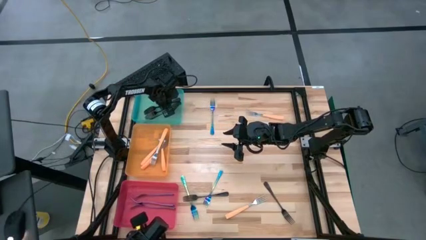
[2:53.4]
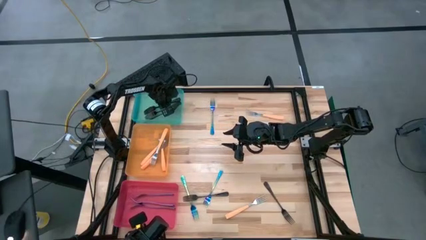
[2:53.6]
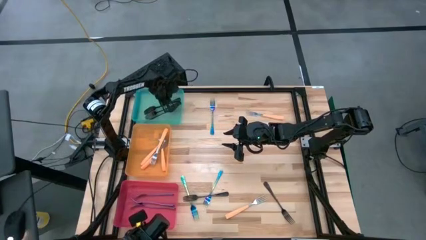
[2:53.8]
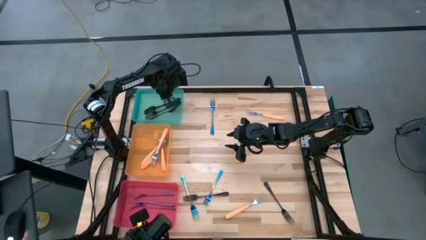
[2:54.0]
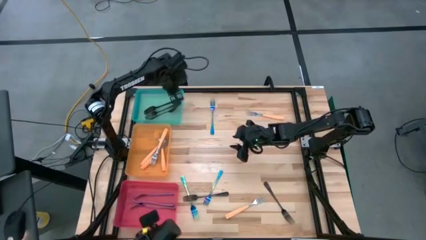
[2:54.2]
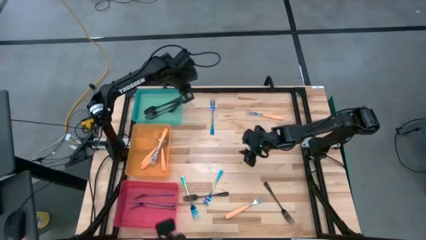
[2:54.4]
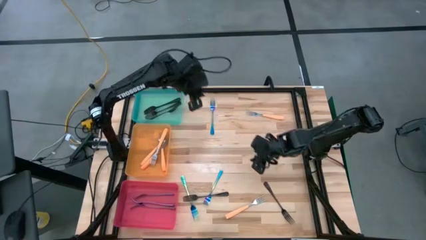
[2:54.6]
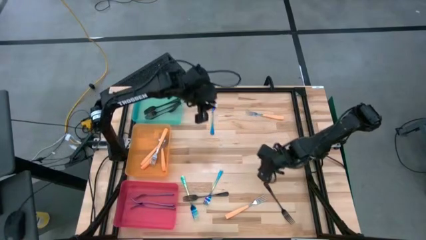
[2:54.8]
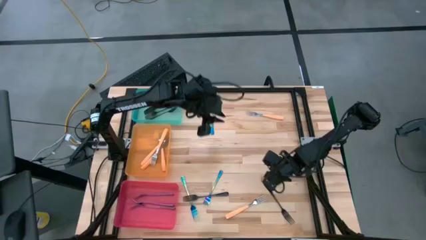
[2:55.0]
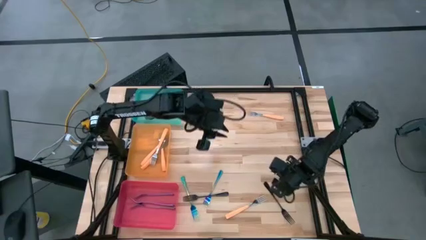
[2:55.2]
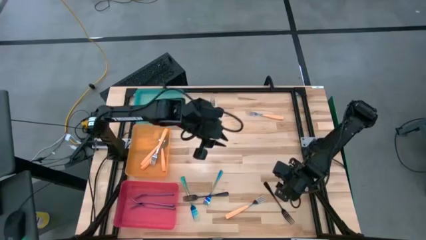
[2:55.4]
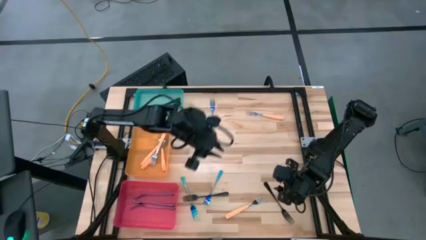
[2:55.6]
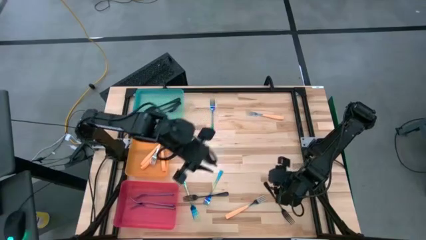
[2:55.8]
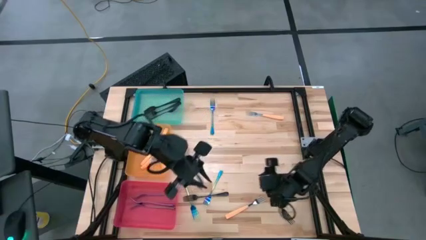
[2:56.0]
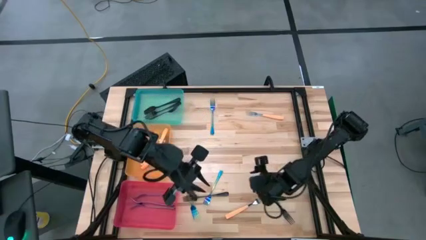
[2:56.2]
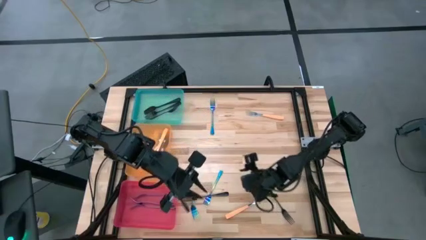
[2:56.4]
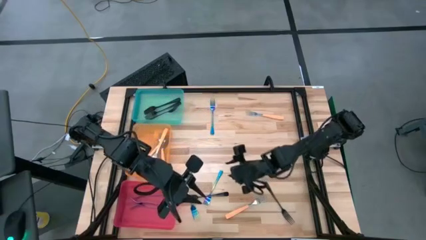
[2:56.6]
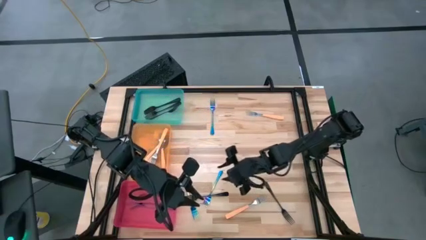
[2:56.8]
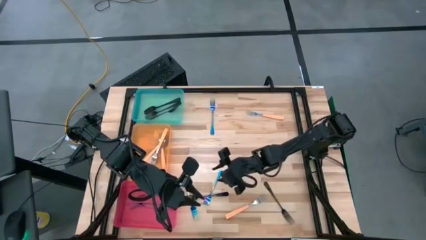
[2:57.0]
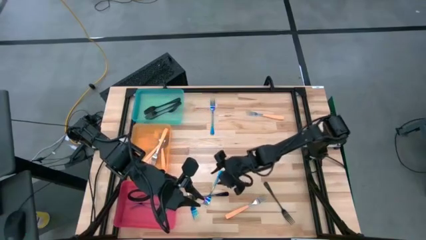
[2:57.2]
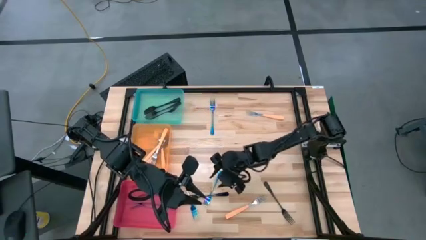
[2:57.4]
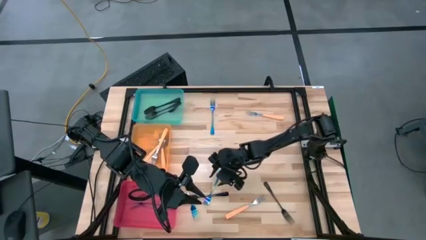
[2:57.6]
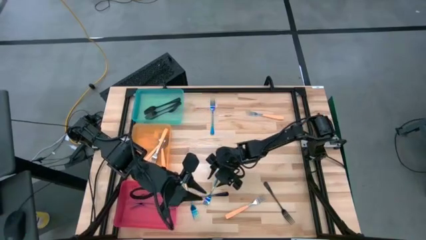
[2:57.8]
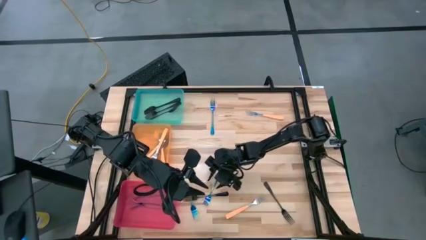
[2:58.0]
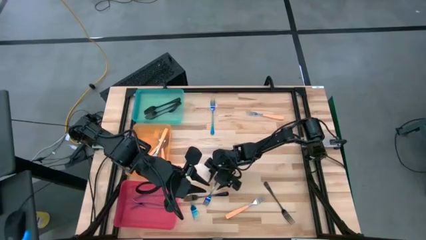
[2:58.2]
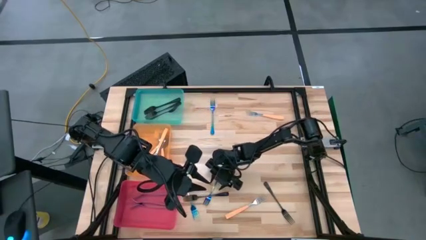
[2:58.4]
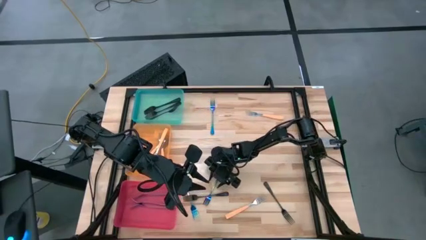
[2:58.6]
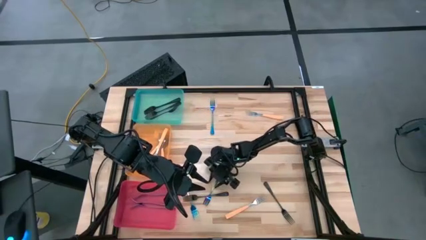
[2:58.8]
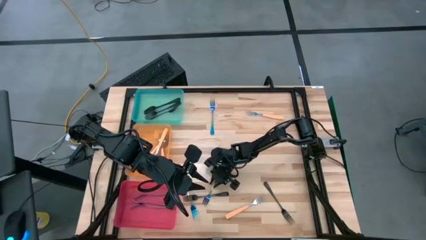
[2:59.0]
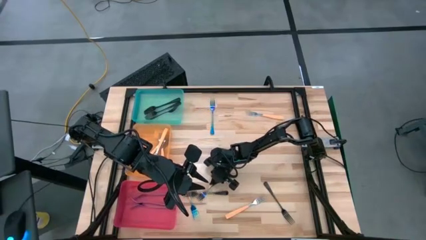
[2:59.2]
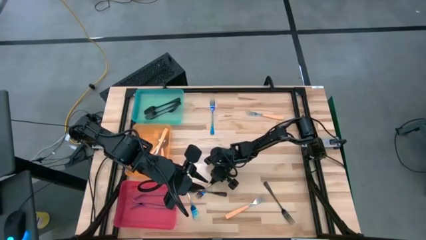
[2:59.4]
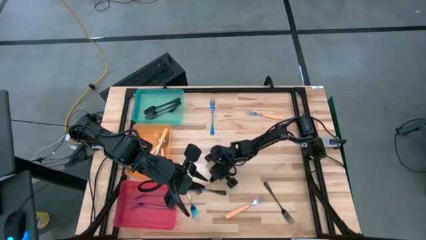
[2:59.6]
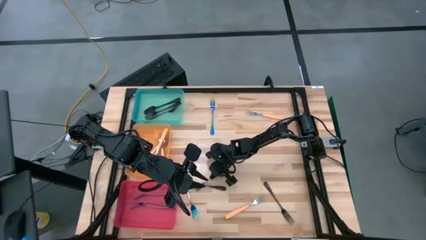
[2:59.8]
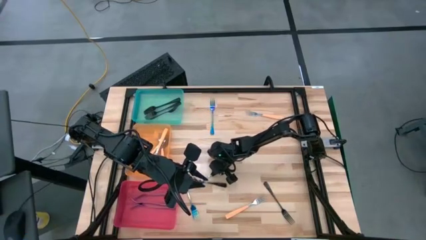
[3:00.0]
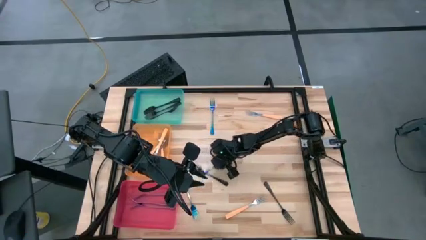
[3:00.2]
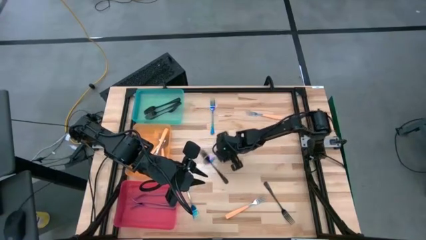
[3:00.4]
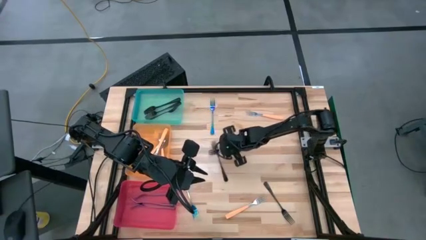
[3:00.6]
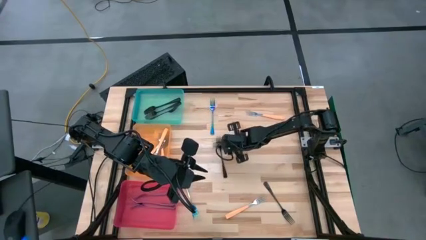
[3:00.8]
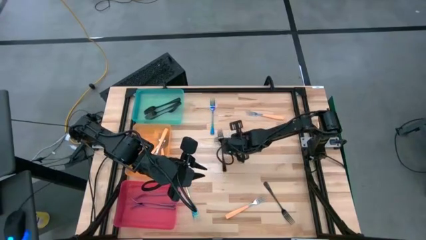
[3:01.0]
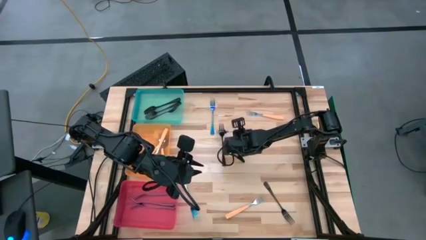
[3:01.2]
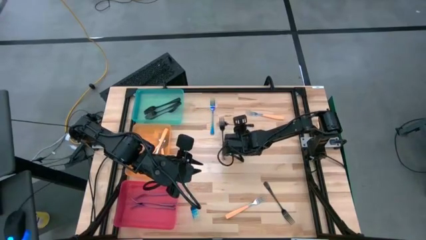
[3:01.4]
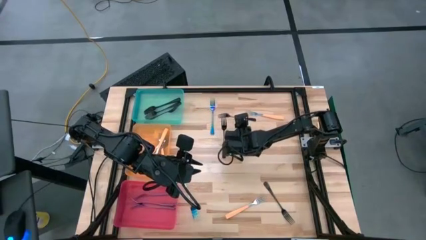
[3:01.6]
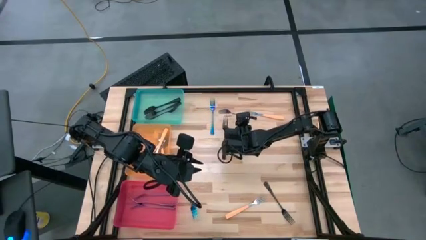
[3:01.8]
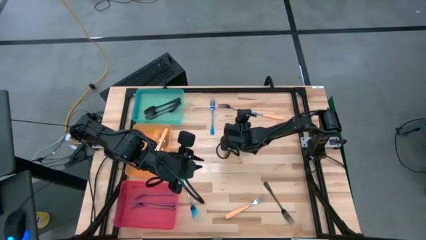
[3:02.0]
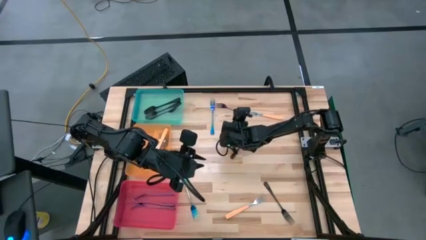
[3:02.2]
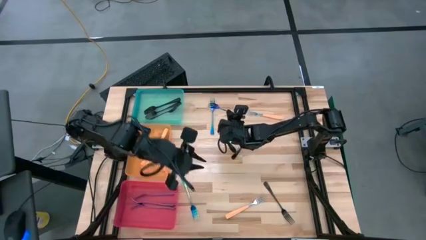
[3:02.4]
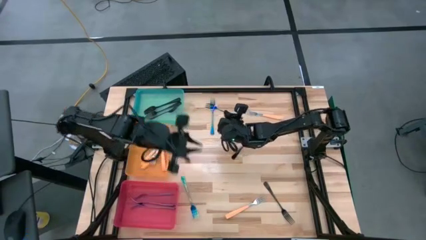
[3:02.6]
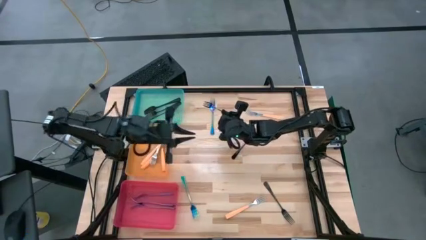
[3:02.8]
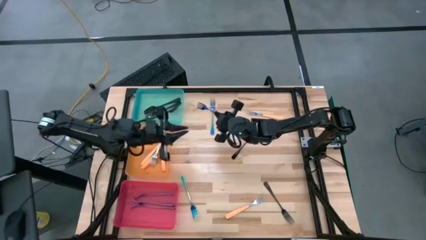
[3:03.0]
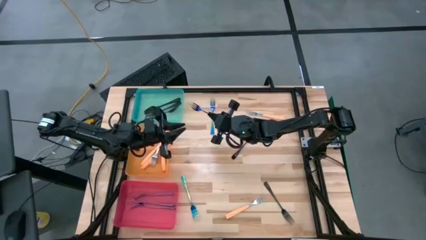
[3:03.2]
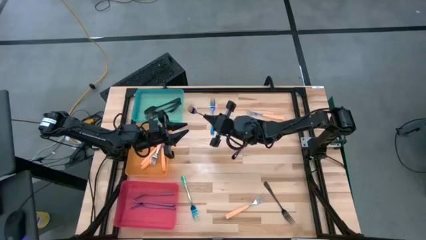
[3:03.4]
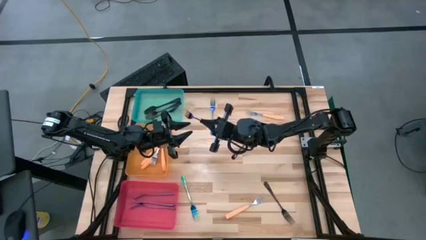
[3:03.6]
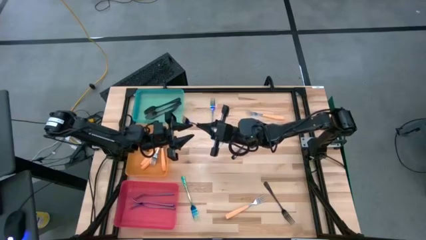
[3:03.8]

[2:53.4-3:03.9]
Task: Sort silverware by color (type)
Put the blue fork into the red bin

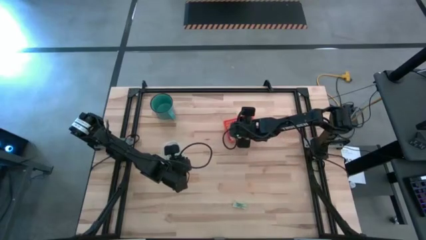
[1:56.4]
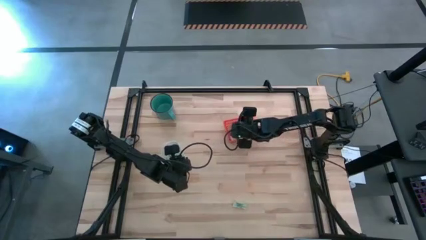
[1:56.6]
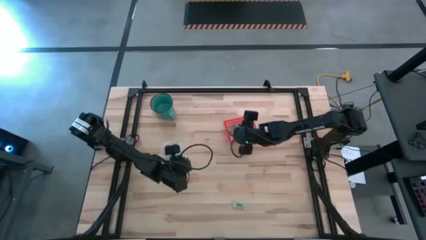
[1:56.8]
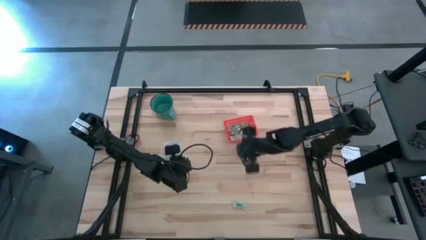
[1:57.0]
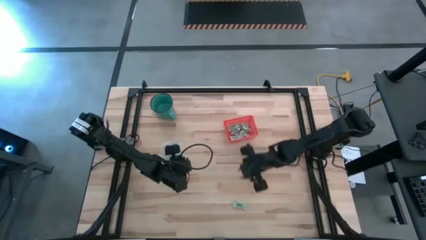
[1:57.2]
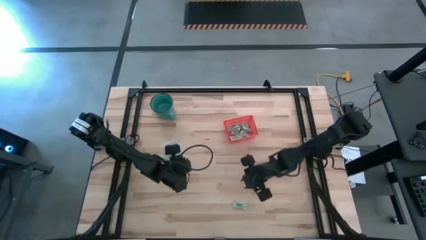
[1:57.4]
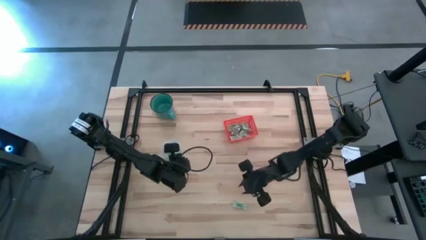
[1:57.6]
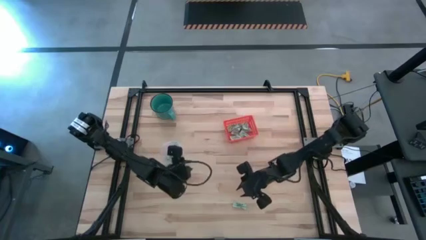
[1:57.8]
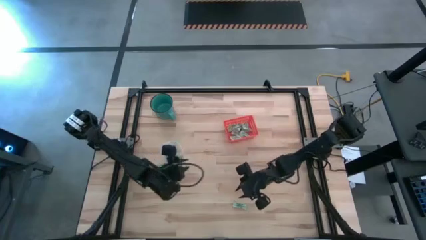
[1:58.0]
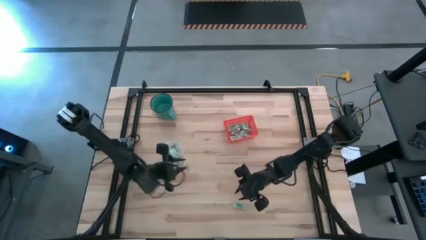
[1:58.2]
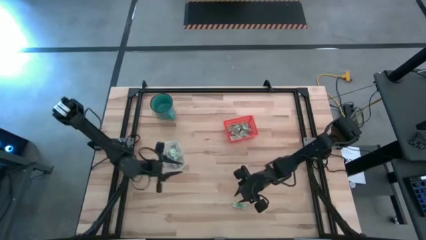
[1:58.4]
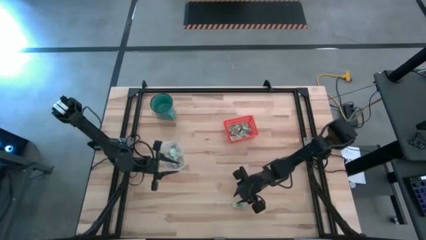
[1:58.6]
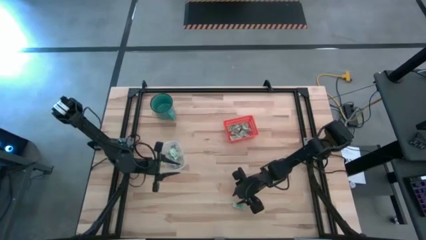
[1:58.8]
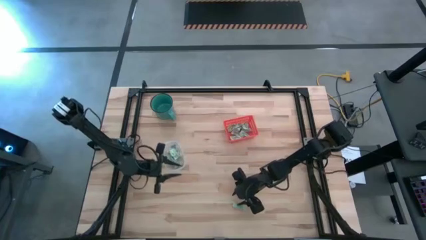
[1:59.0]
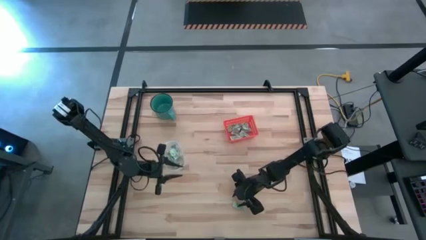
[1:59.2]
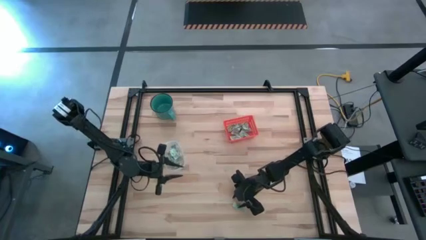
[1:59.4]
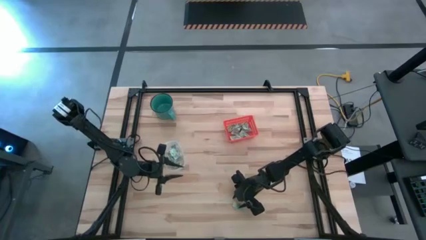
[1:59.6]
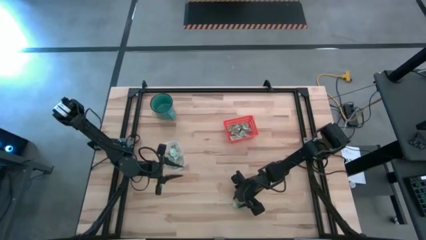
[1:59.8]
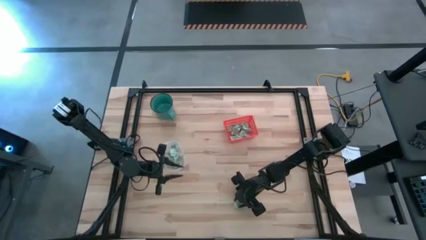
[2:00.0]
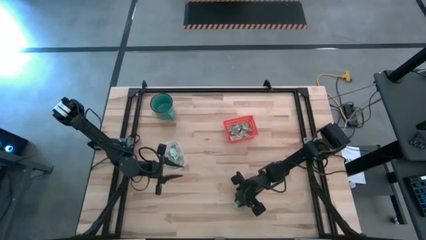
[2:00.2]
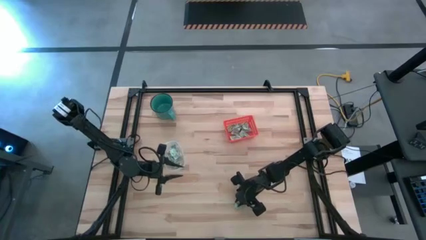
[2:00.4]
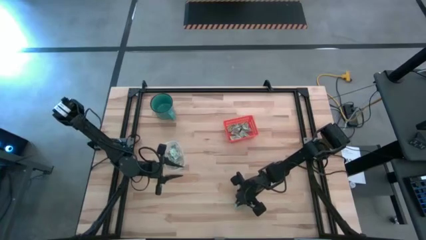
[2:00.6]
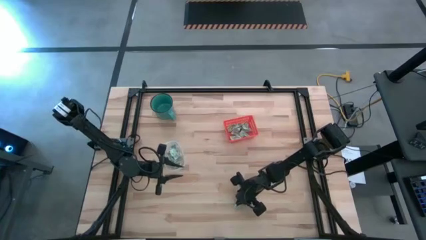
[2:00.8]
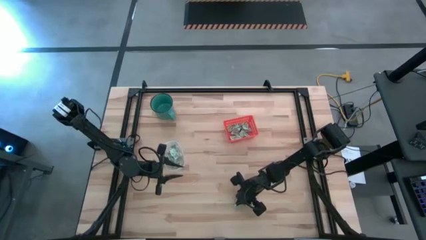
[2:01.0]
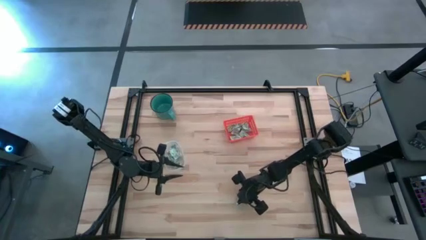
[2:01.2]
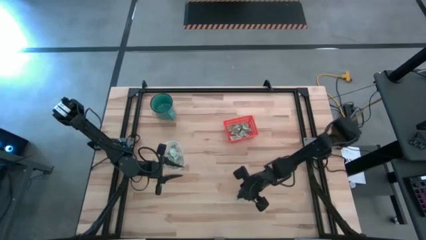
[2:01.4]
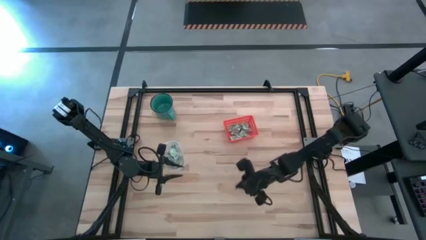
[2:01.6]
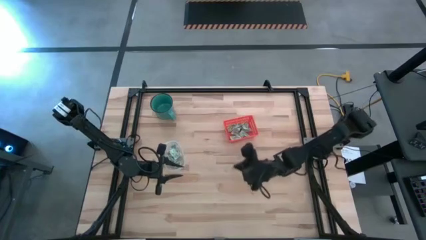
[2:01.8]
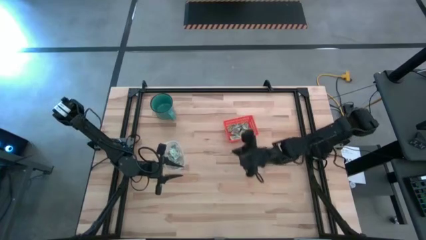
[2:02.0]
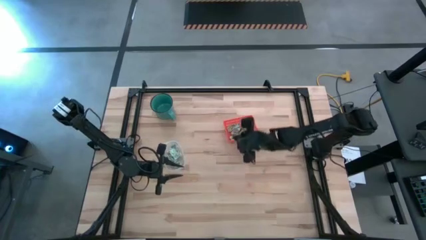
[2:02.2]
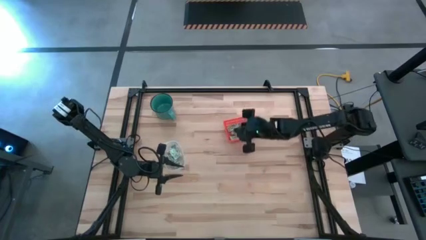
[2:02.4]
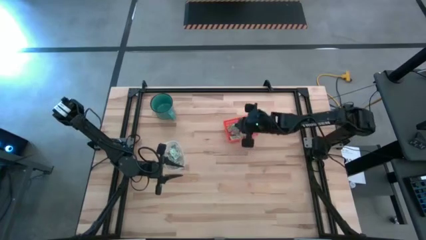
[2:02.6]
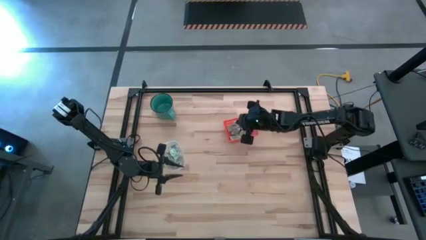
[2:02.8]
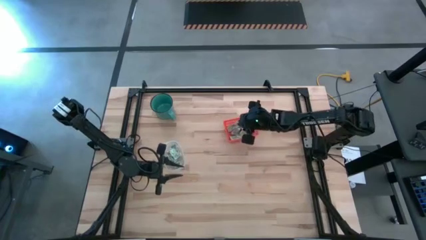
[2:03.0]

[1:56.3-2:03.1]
Task: Pick and place items into bin
Put the light green stevia packet into the orange bin
